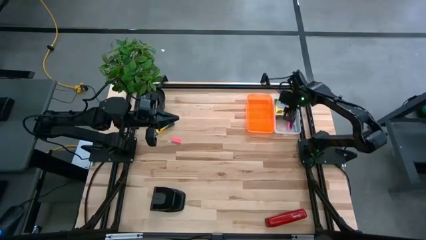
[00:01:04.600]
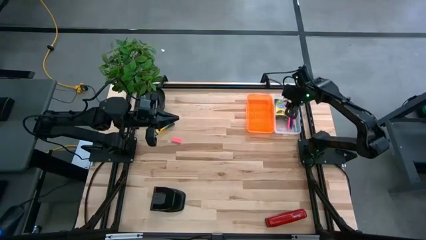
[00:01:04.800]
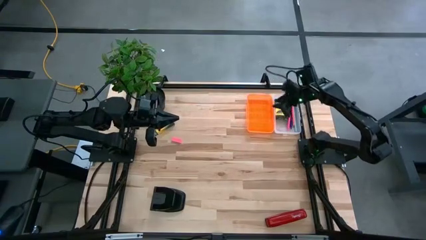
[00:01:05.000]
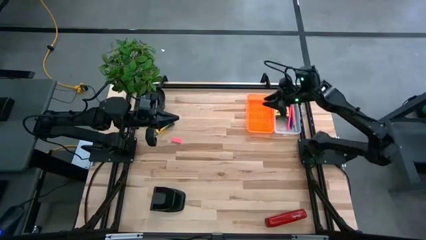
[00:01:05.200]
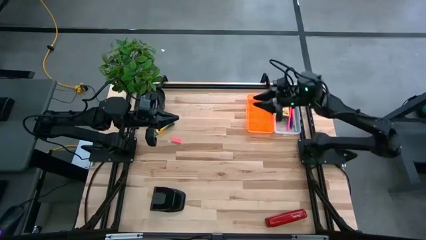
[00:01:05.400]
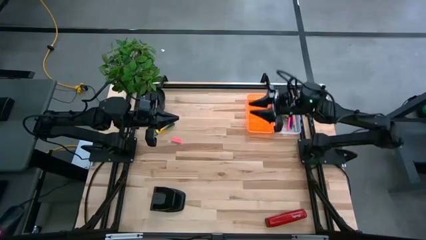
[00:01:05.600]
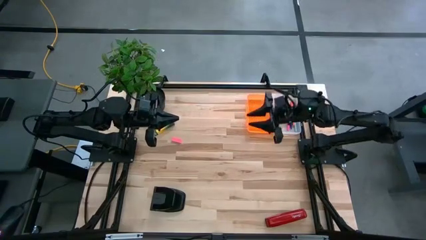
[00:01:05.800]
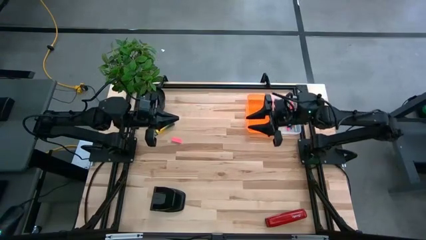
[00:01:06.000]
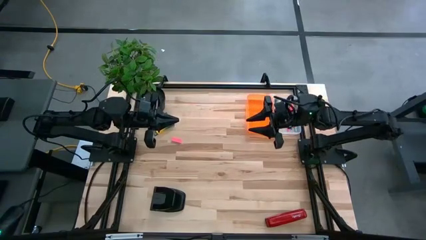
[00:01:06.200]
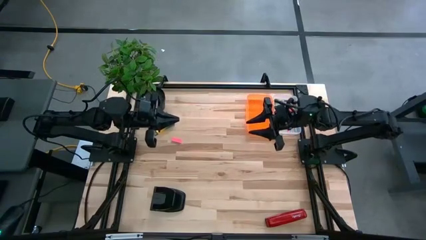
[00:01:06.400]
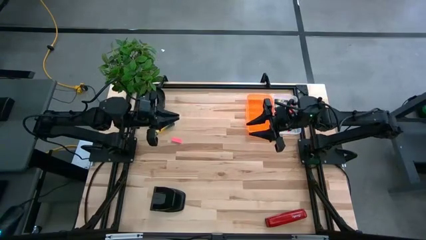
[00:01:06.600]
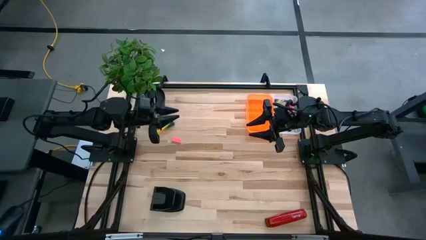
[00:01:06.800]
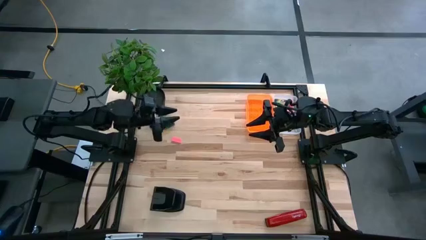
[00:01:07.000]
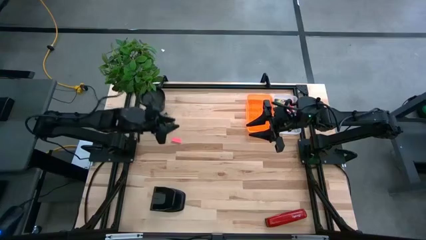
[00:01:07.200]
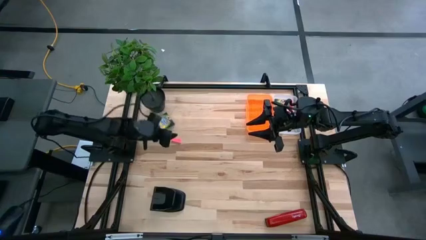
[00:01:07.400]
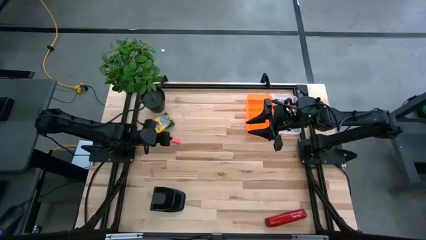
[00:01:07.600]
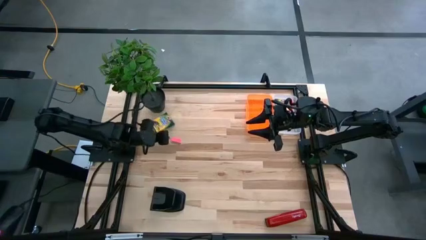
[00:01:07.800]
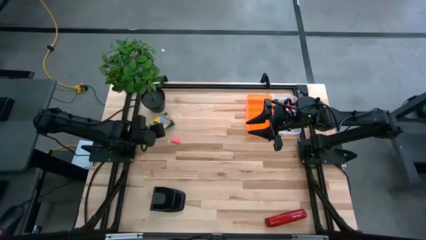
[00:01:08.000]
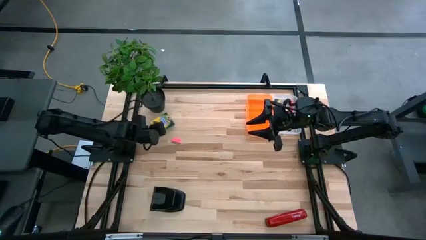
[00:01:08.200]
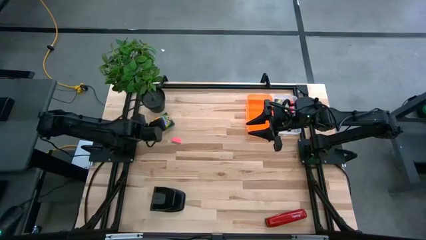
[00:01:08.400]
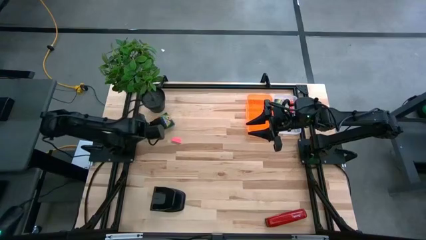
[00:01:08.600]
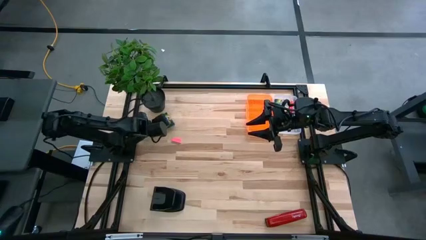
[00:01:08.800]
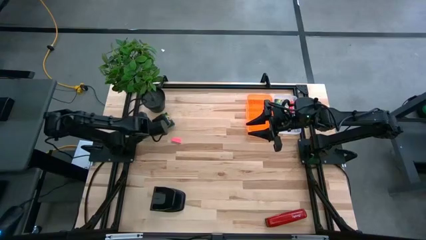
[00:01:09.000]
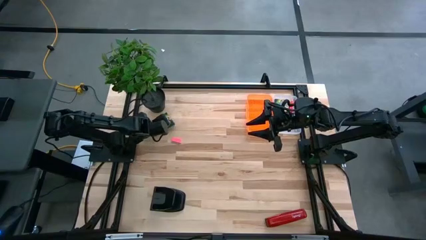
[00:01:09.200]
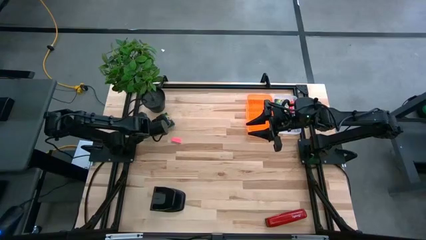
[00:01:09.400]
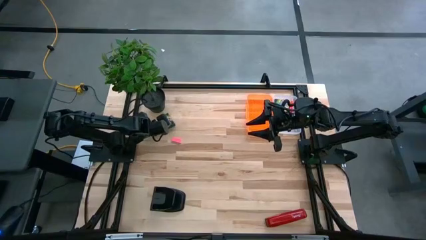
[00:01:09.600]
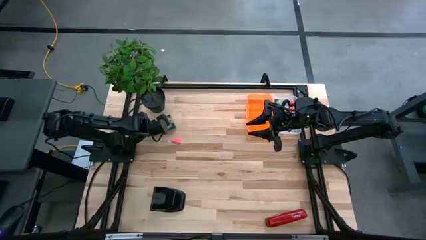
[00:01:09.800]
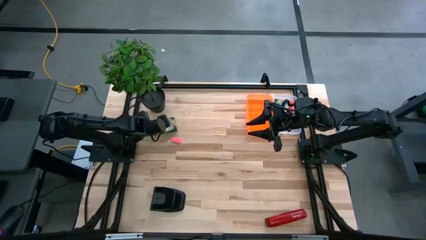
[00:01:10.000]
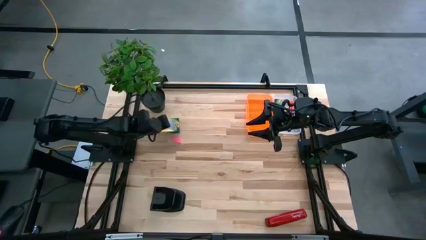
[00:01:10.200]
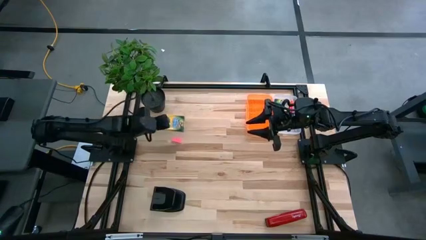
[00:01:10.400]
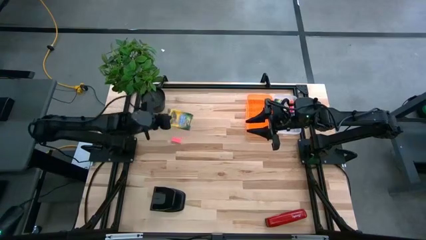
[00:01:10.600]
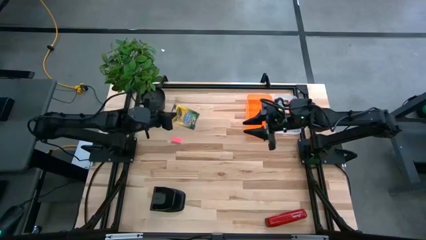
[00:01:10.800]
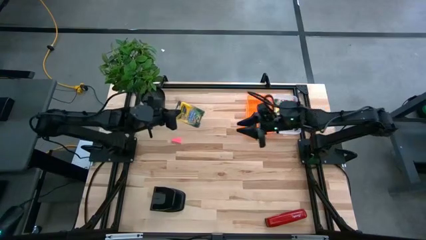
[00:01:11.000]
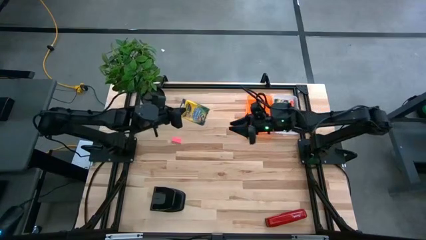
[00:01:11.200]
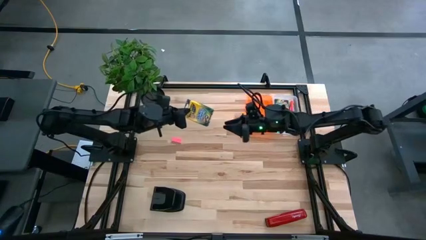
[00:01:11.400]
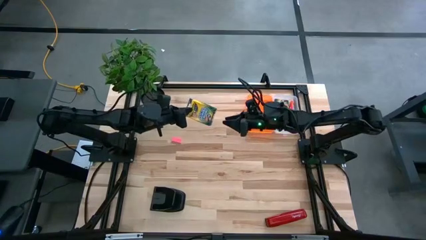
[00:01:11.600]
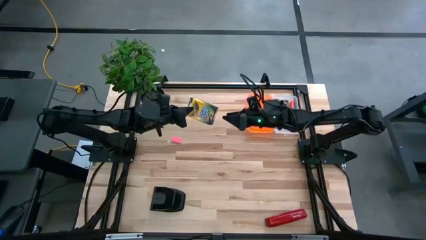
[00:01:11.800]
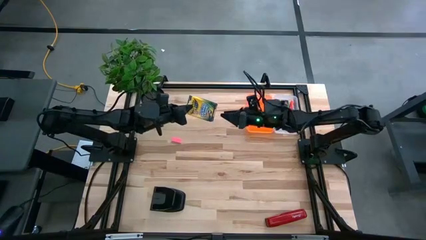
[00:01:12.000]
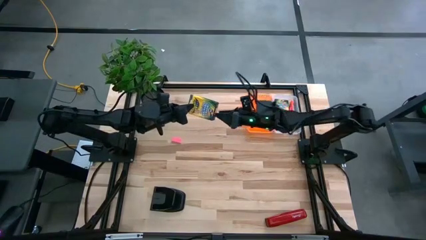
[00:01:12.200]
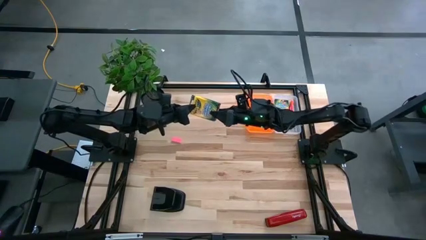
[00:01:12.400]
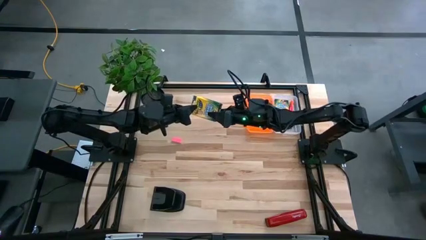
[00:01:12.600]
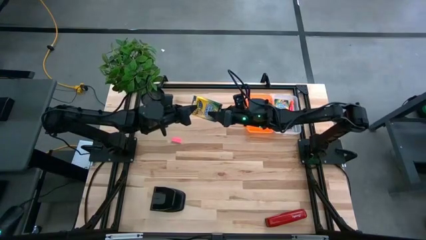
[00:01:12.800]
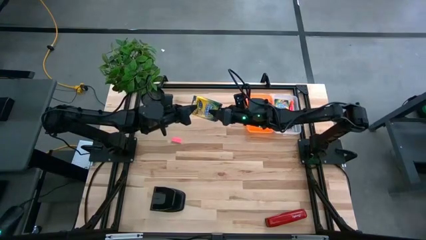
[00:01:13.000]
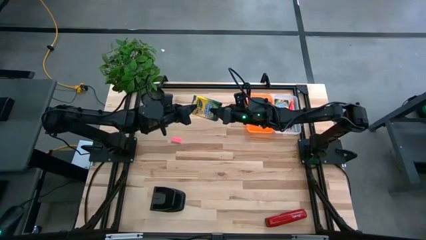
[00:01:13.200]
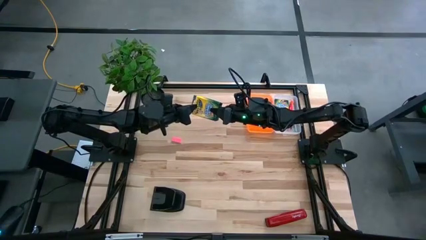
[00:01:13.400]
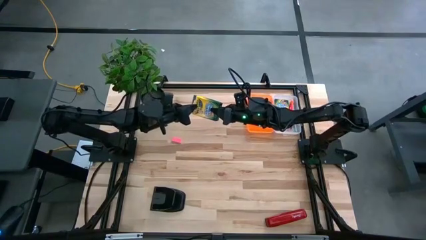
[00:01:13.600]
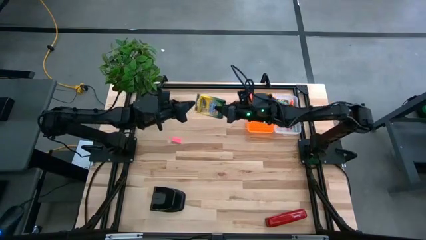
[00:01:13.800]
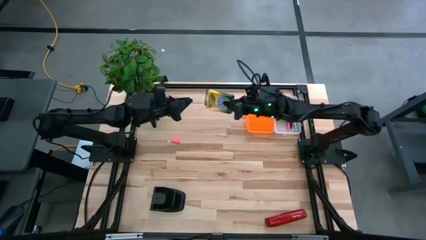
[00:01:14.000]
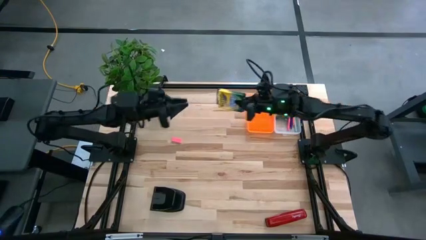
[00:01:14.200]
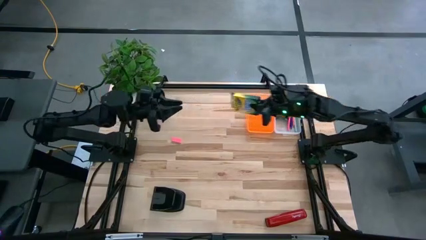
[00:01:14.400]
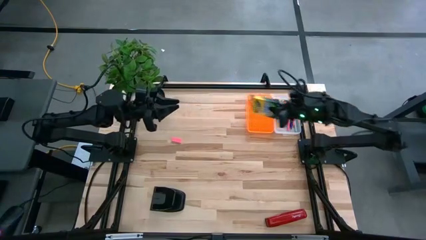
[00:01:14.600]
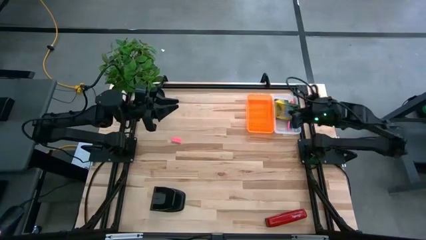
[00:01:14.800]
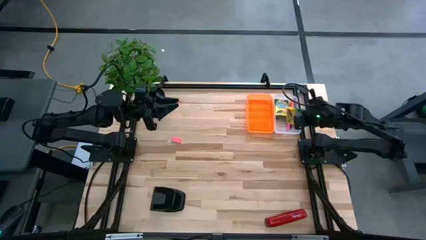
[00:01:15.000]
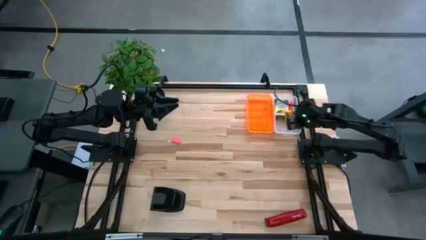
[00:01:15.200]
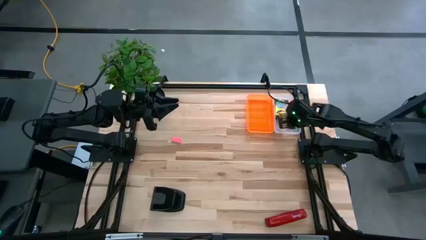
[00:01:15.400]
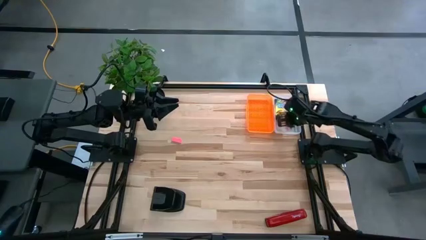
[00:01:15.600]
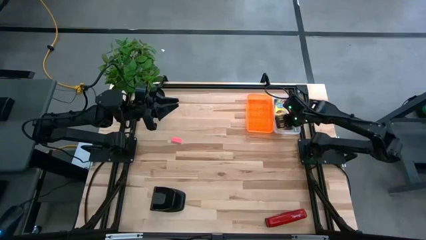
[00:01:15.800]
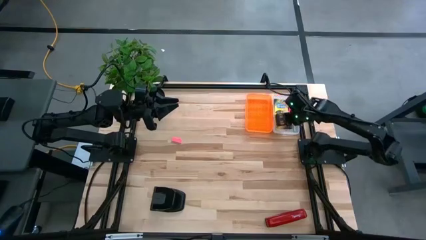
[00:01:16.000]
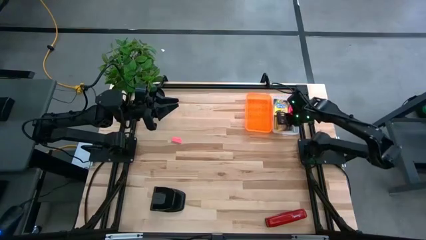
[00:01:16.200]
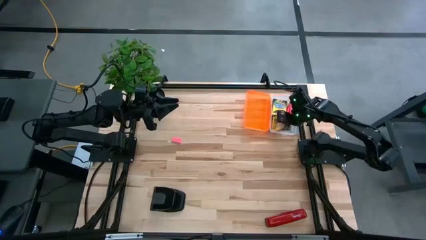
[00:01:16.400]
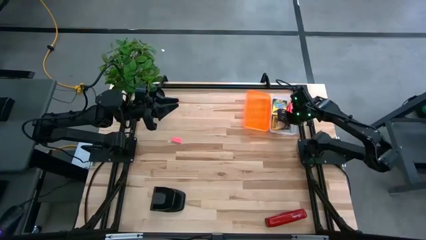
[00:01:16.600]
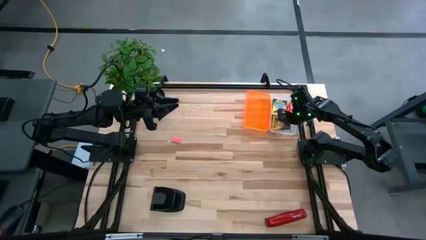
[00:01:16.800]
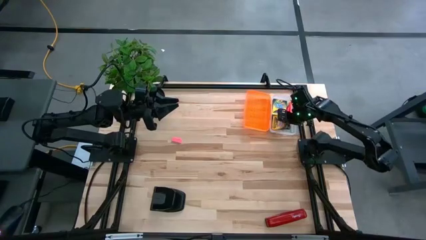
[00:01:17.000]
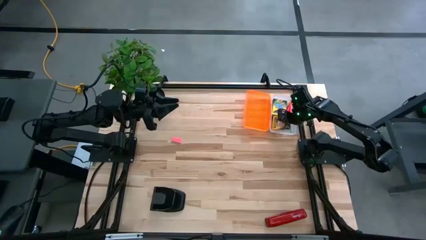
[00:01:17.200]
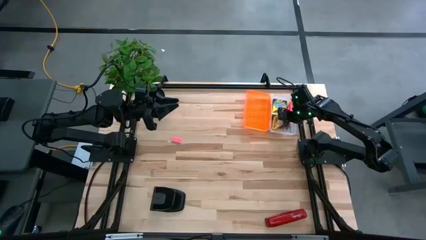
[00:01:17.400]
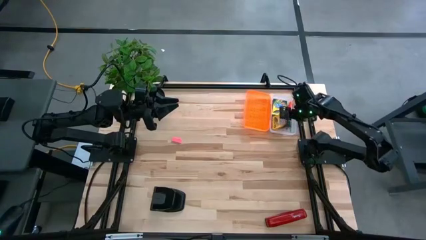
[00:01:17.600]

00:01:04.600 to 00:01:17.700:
Task: Pack school essentials
Put the yellow crayon box into the orange supply box
